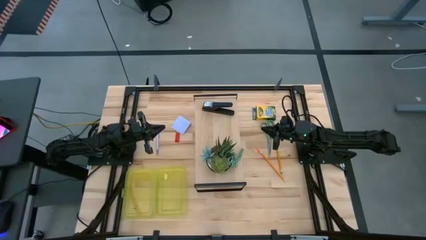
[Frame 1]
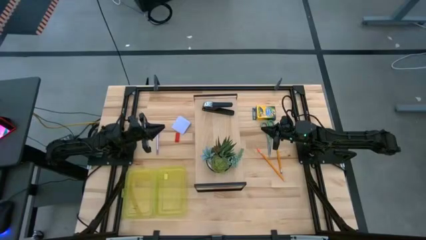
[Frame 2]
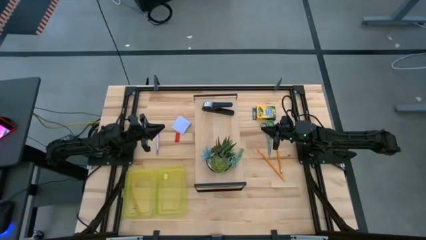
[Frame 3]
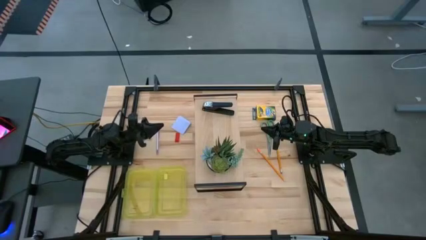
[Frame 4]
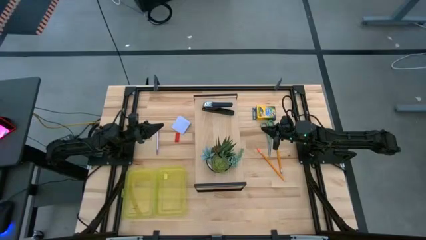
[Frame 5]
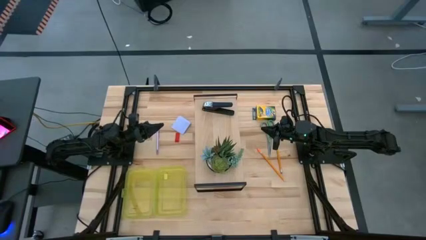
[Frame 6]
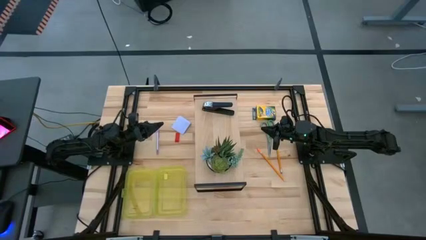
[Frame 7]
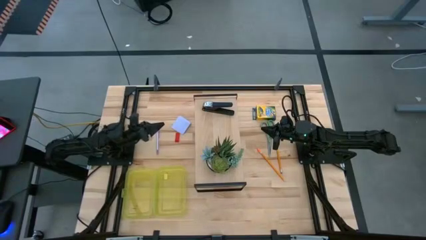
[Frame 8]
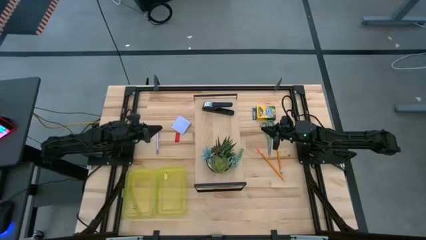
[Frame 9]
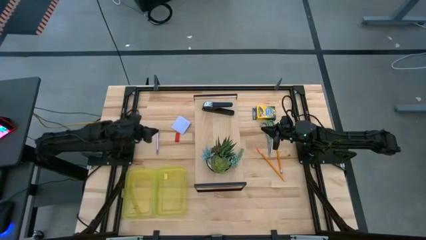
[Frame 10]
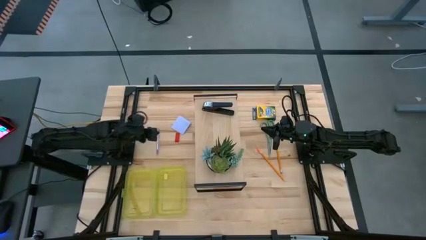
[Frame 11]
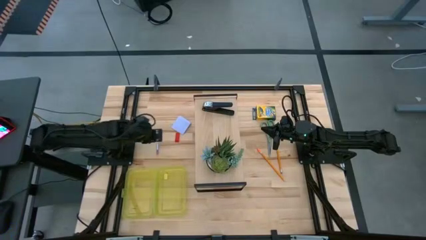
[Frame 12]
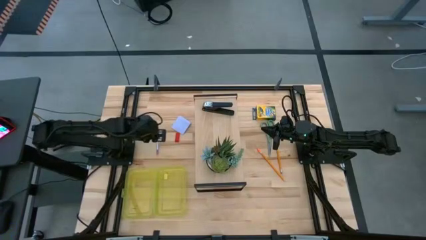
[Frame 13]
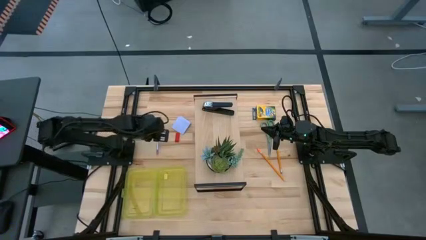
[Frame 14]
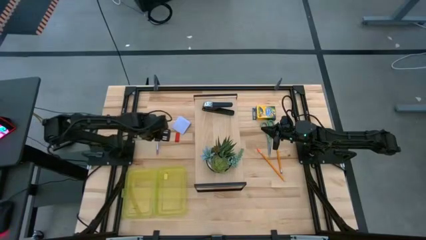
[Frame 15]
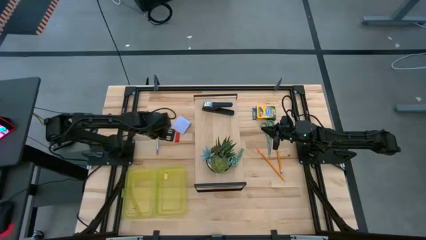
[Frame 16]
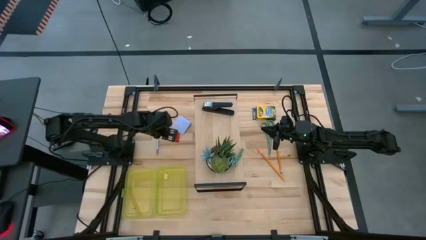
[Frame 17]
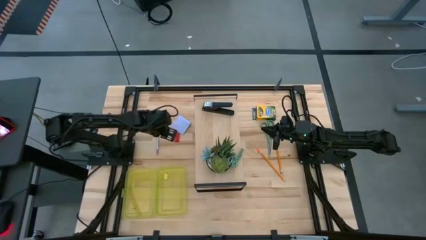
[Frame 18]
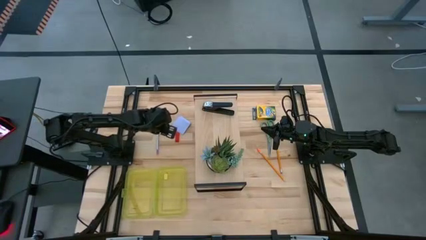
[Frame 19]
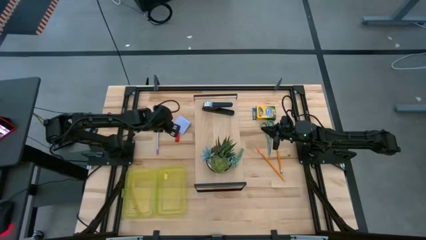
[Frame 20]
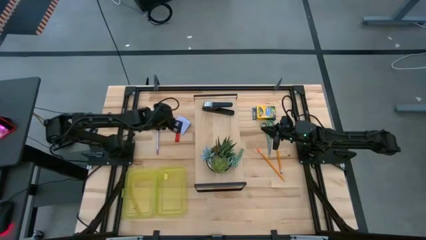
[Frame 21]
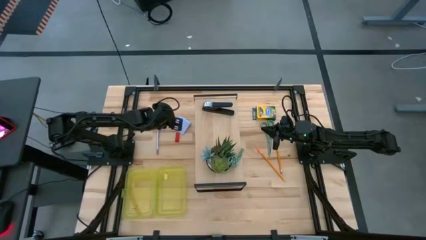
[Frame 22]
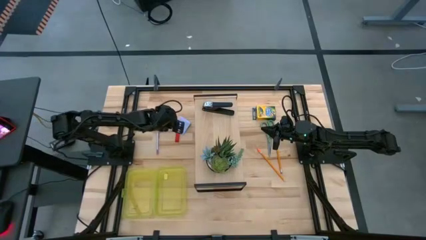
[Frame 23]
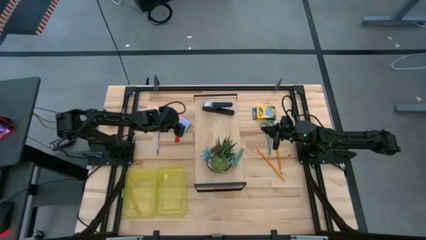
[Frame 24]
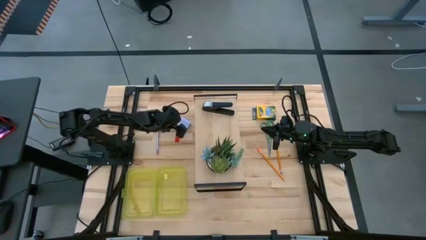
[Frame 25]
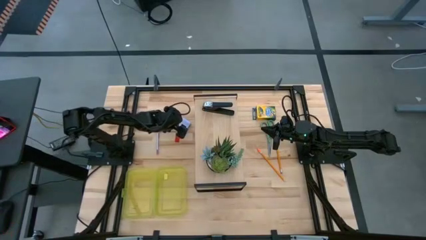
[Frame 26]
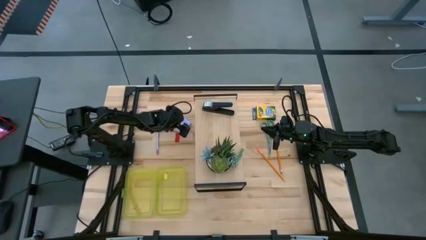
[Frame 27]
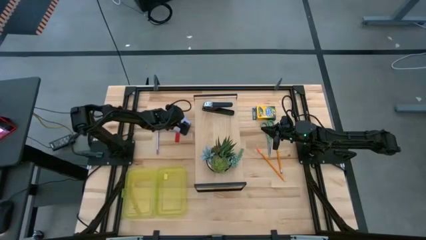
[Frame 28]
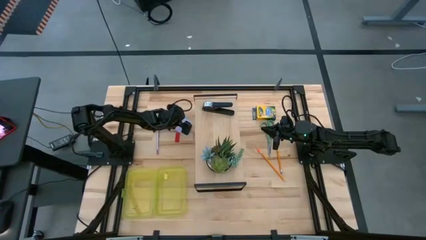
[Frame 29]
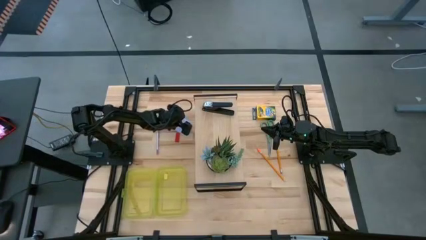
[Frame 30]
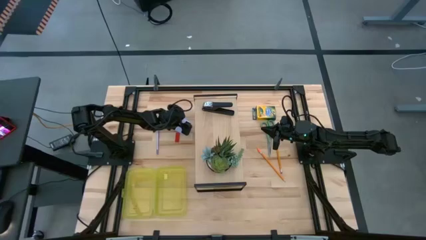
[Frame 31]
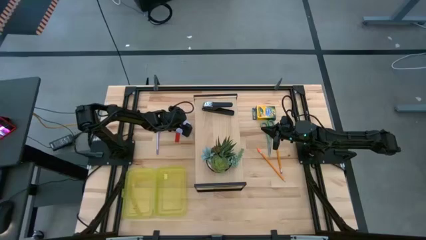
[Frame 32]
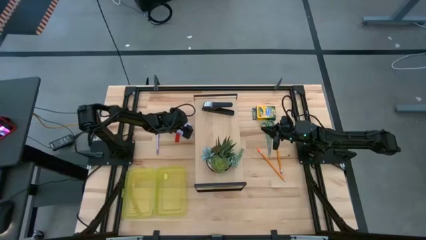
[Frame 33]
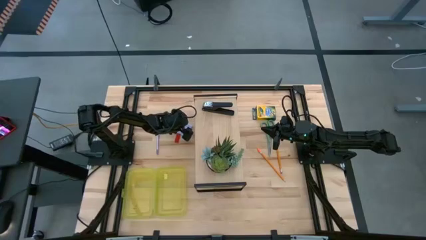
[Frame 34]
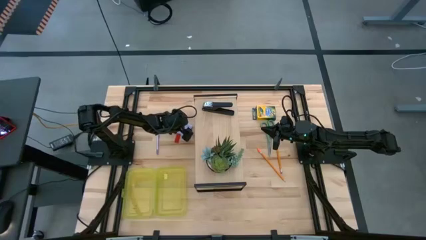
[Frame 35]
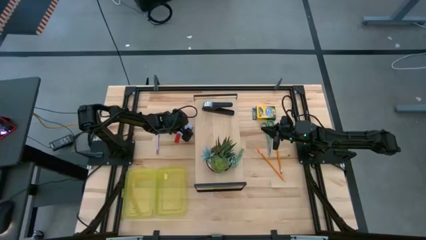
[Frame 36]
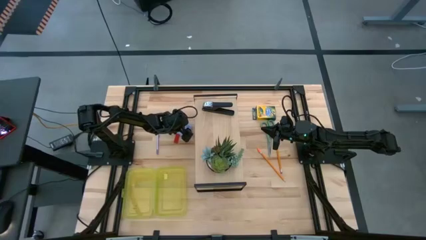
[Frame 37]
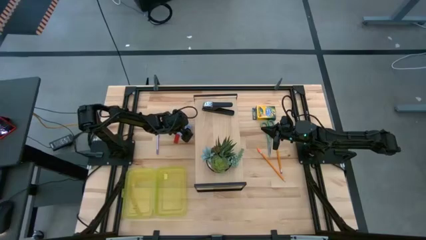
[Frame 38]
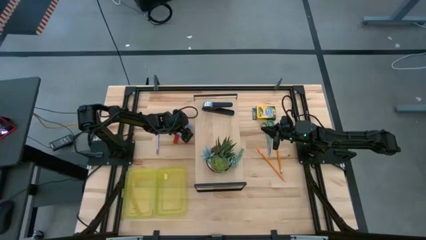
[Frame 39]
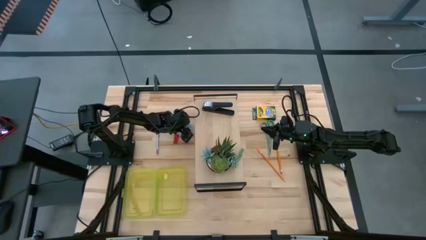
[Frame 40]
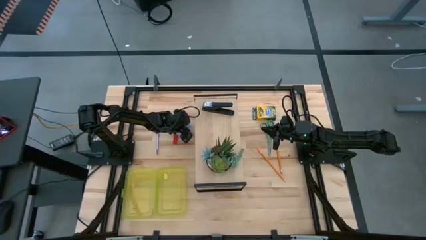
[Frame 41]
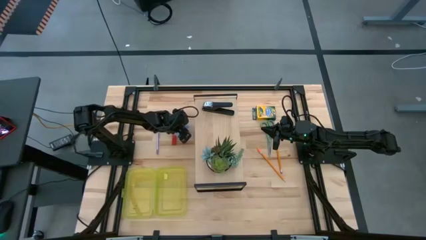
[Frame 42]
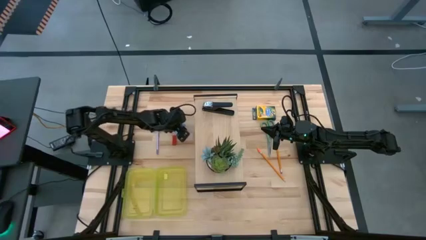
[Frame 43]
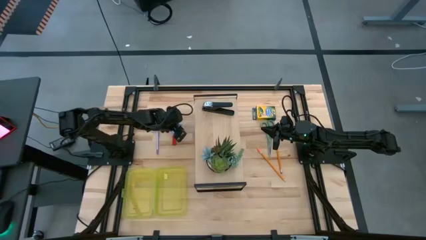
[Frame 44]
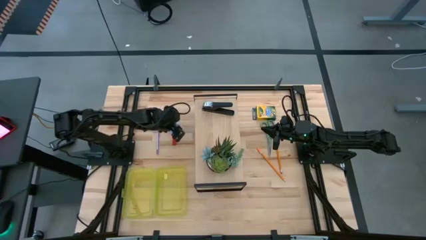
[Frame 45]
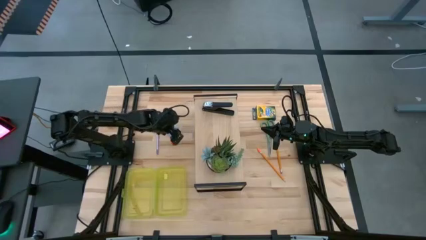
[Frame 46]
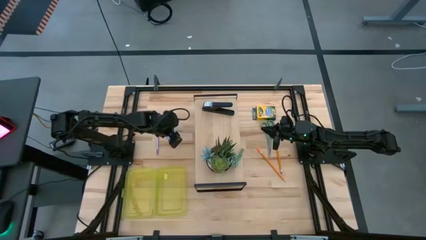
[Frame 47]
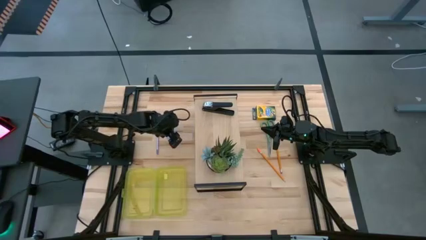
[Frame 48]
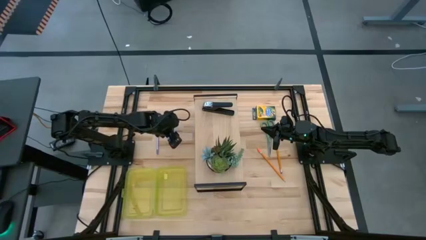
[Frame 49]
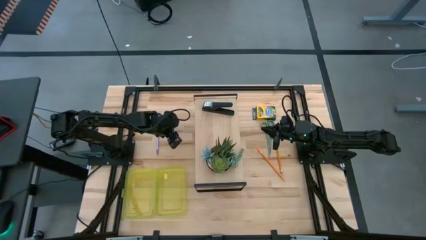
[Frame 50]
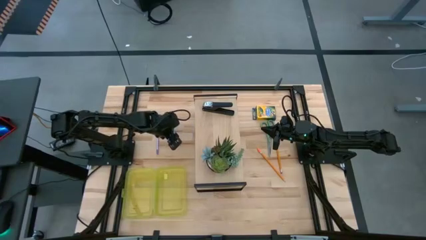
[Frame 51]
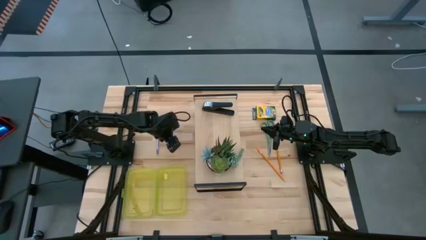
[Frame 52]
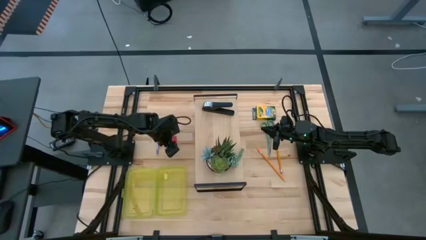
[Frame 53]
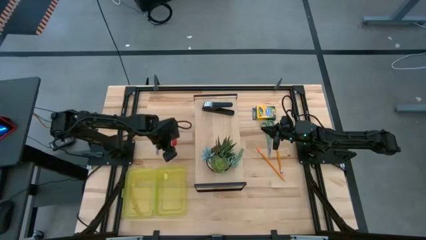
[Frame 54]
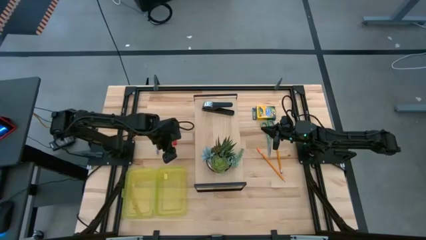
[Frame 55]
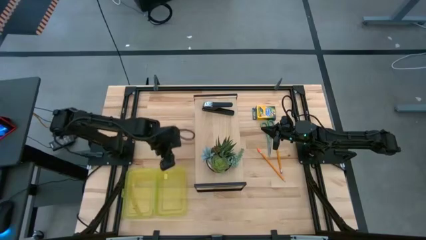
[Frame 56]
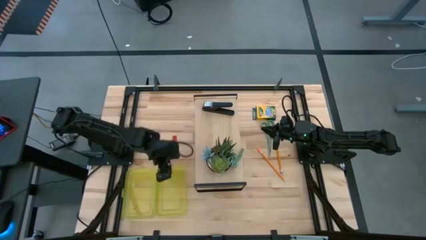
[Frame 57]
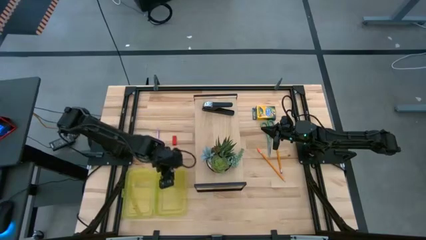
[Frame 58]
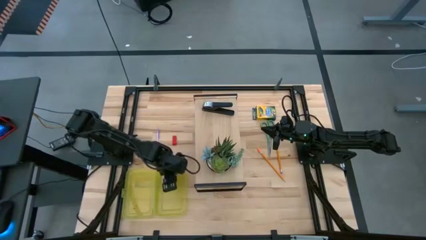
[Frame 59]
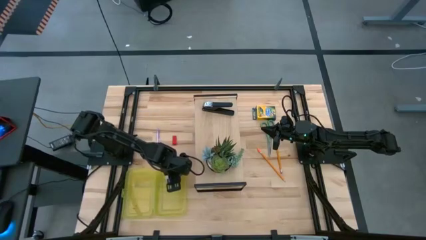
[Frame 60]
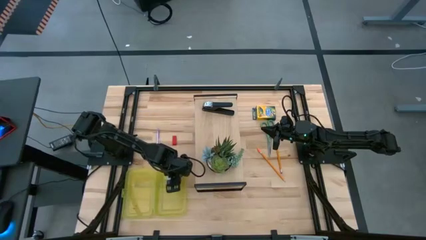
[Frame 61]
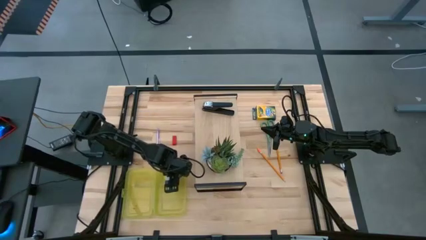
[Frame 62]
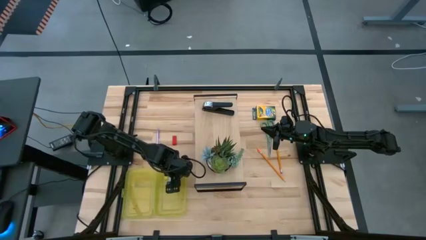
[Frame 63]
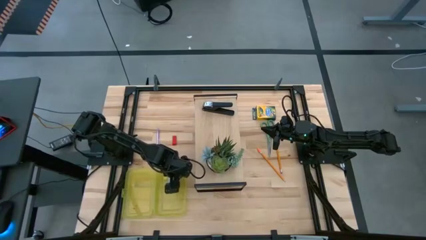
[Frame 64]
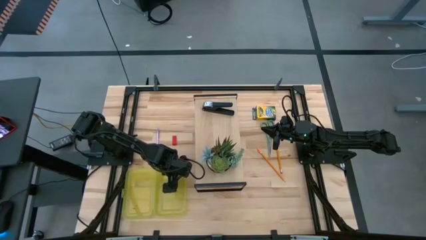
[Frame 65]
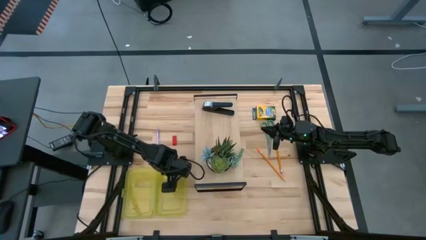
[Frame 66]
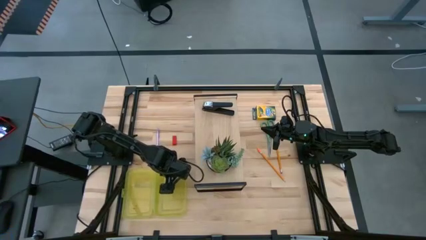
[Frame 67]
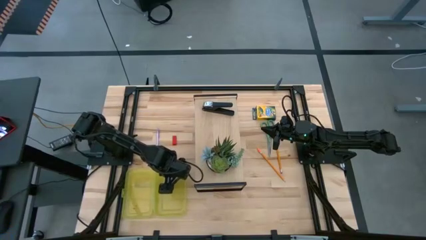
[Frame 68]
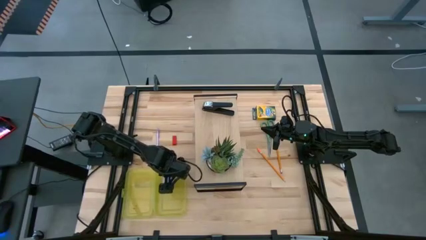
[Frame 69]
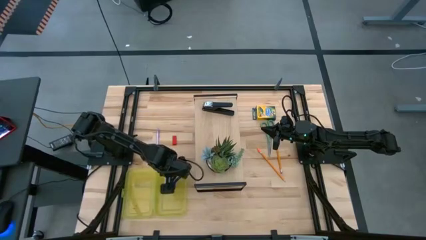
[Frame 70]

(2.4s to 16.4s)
Task: Pack school essentials
Put the white sticky notes into the yellow supply box
